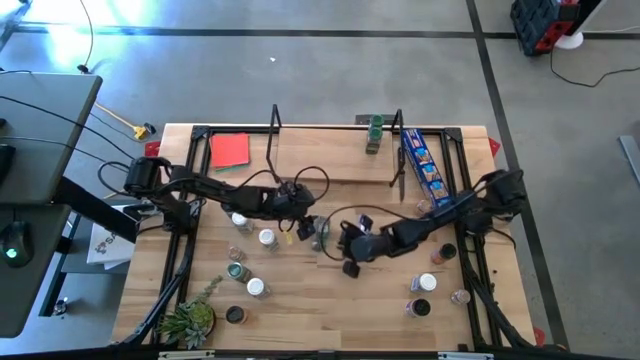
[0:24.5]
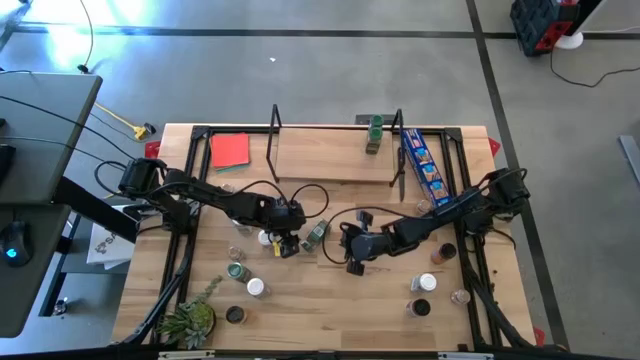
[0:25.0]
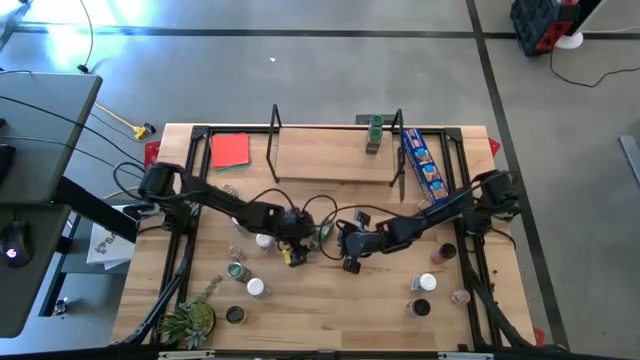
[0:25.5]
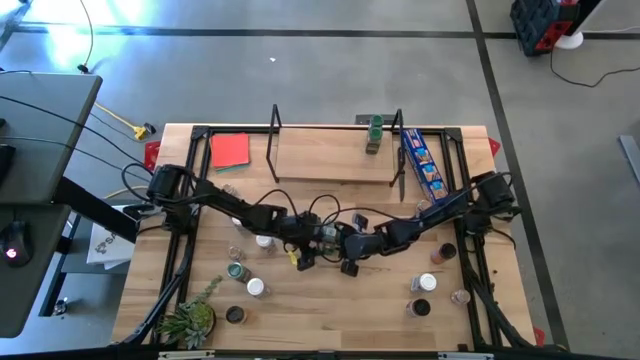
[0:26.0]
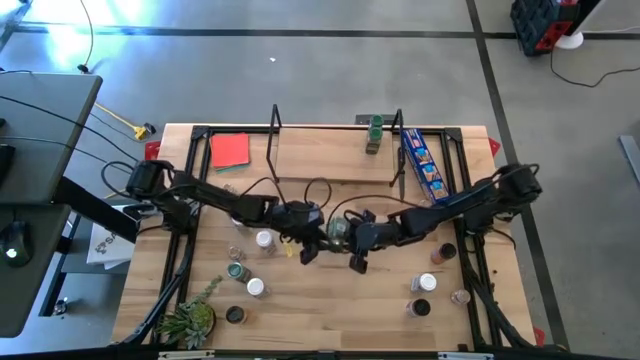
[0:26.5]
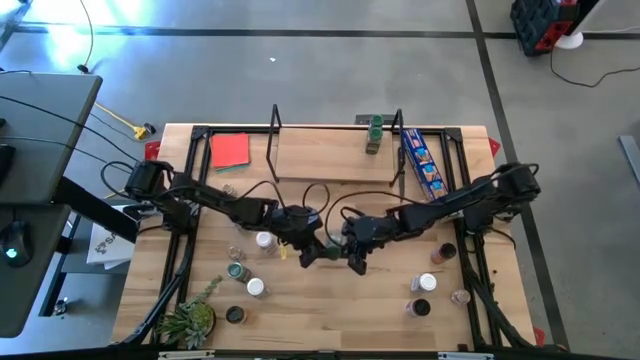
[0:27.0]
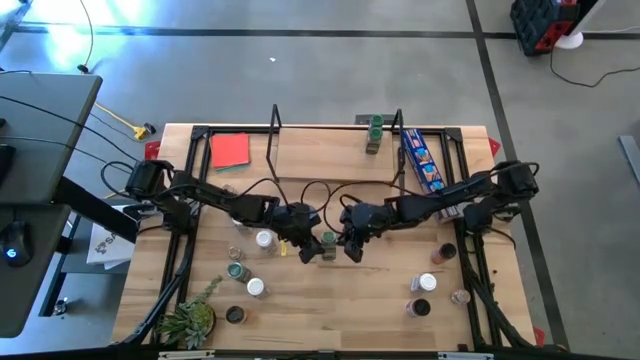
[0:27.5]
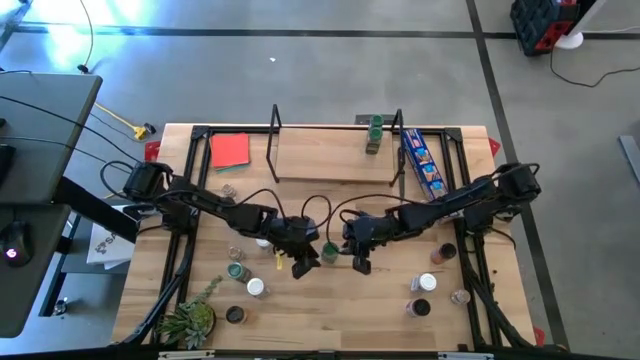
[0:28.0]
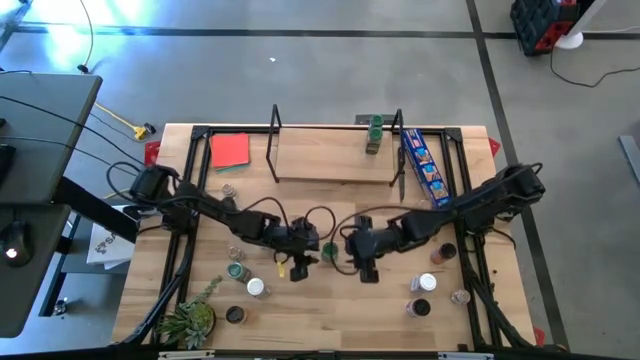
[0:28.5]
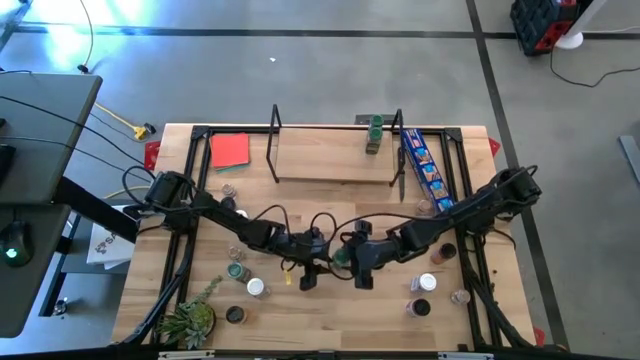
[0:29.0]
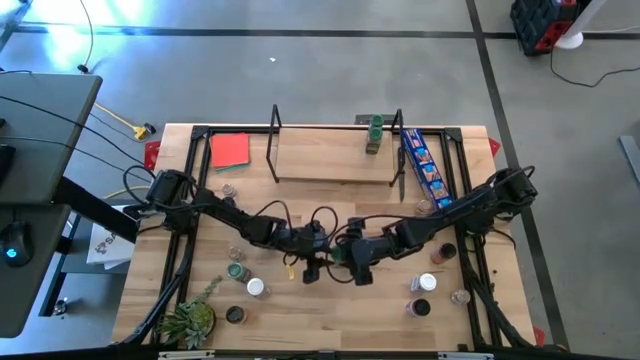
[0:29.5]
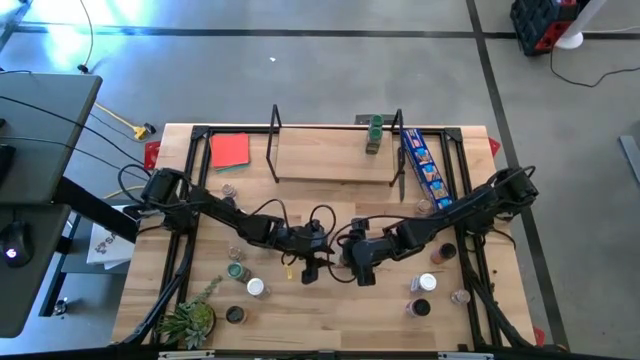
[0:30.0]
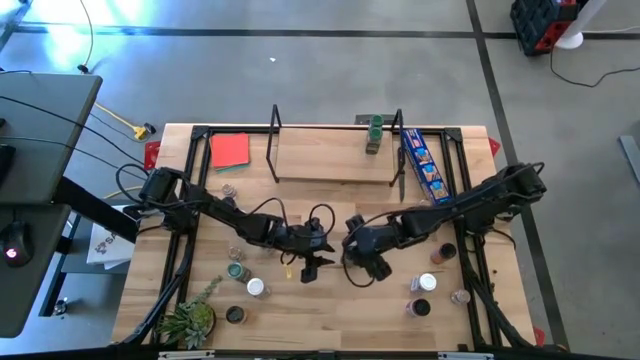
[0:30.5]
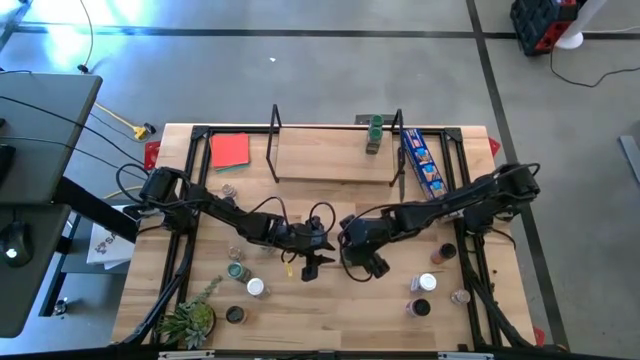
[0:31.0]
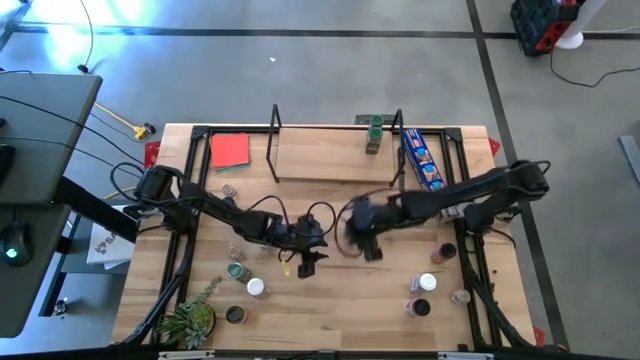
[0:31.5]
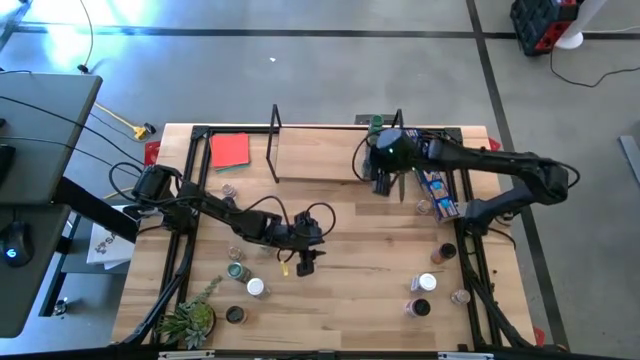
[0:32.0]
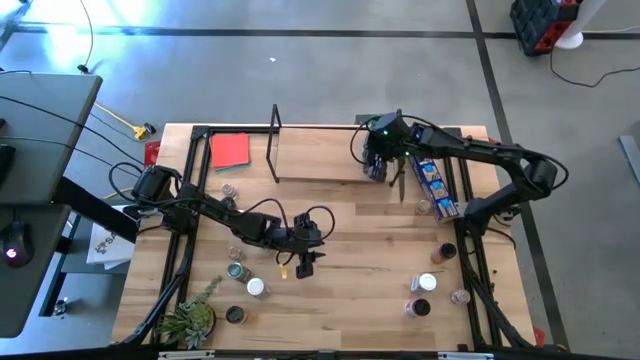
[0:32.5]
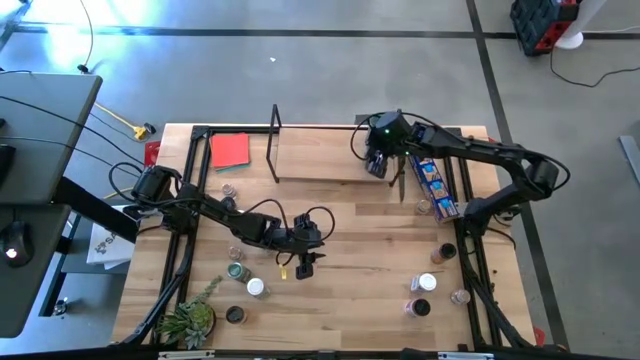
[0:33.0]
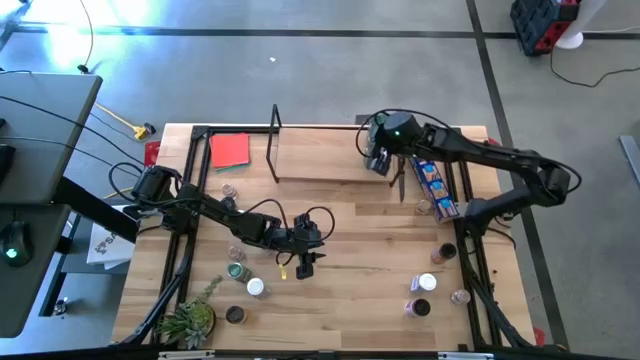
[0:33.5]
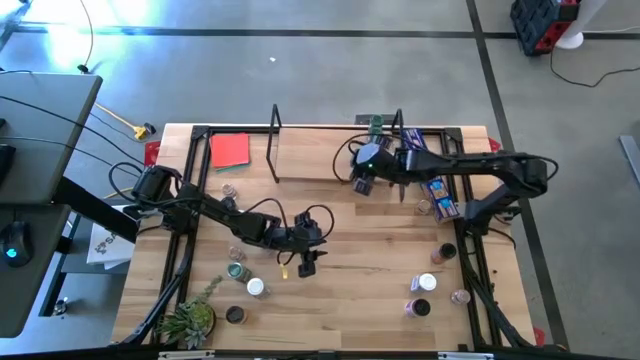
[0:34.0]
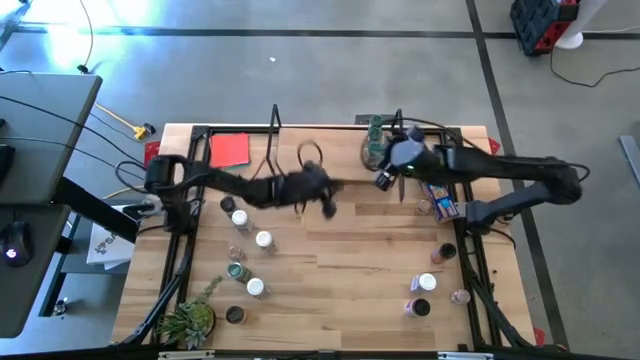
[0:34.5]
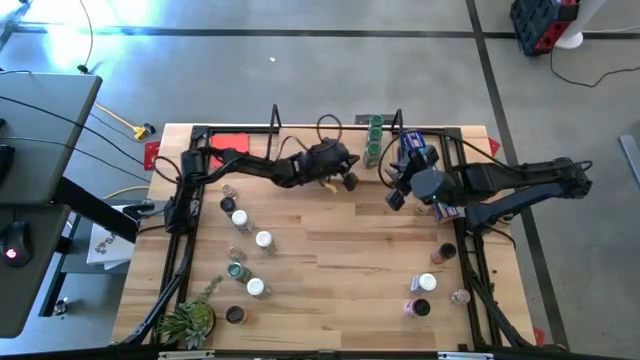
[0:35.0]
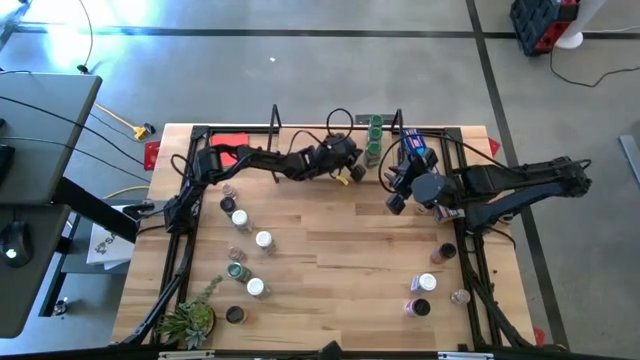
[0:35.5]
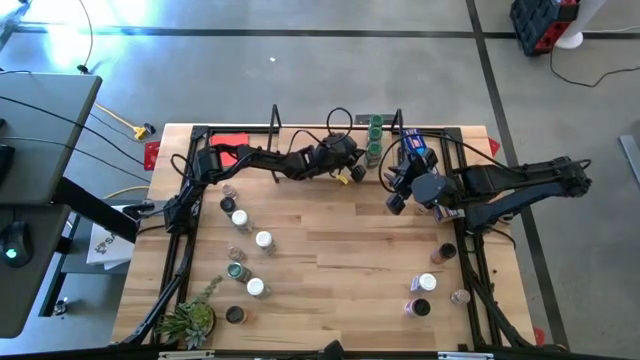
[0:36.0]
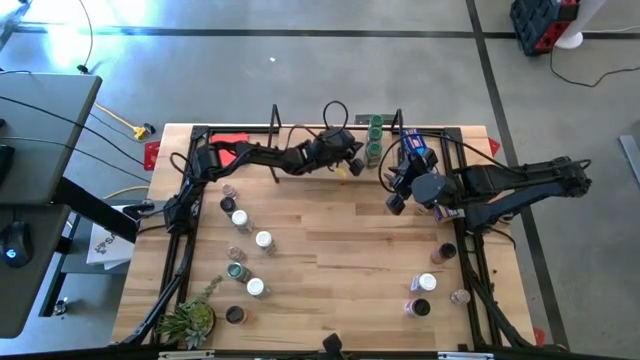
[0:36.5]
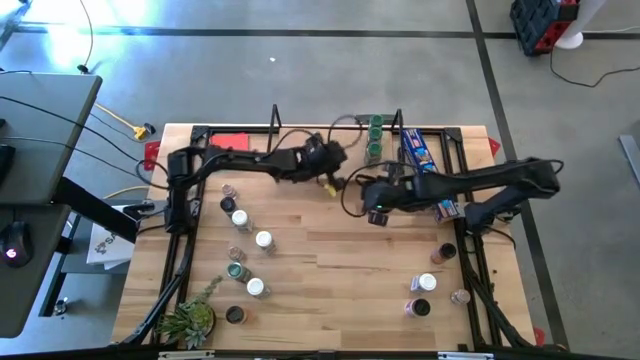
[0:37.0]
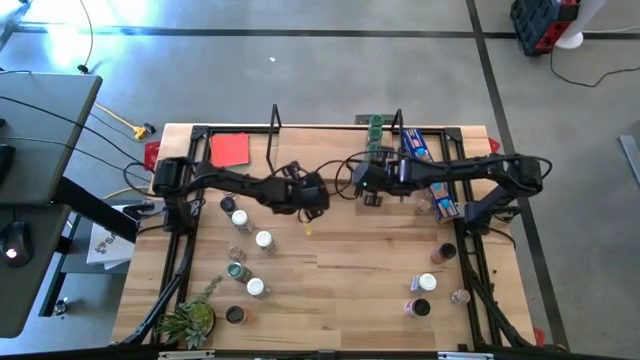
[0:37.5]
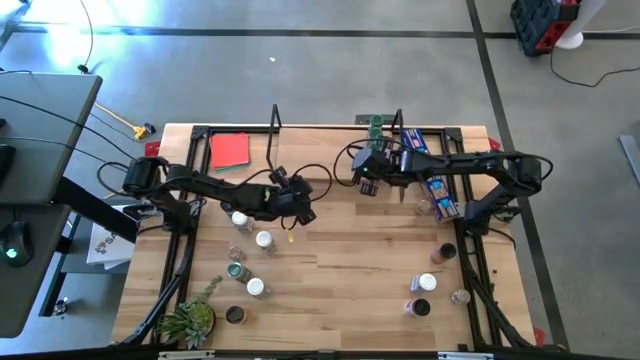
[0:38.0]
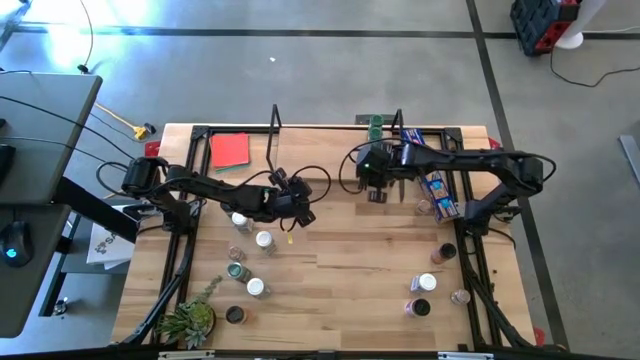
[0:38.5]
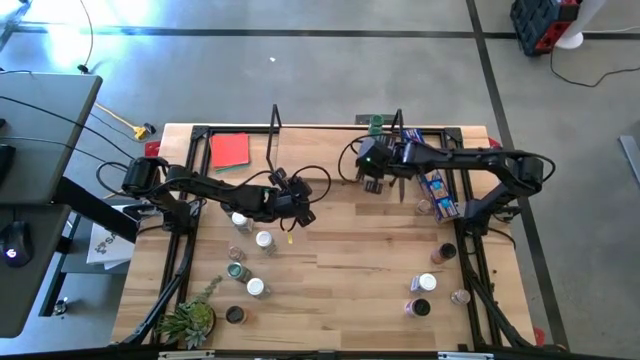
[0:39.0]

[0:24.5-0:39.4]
Task: Shelf spices
Put the top green seasoning bottle on the shelf aligned with the other green seasoning bottle
